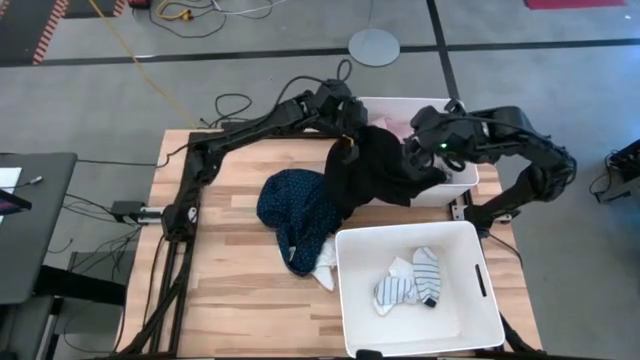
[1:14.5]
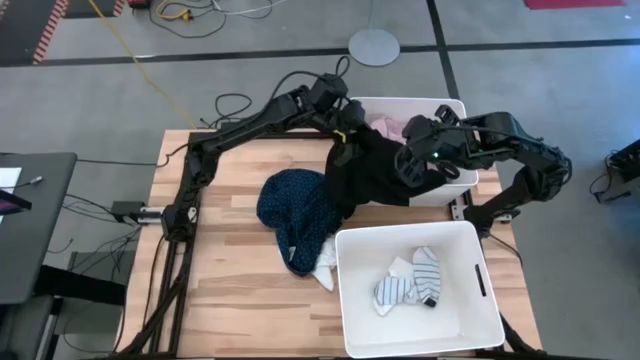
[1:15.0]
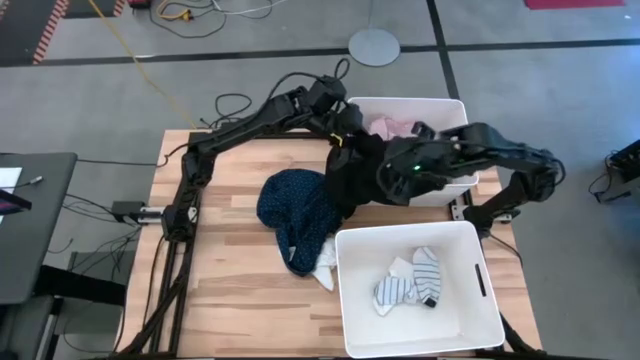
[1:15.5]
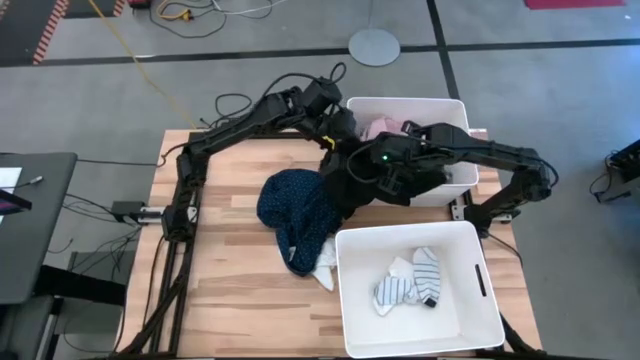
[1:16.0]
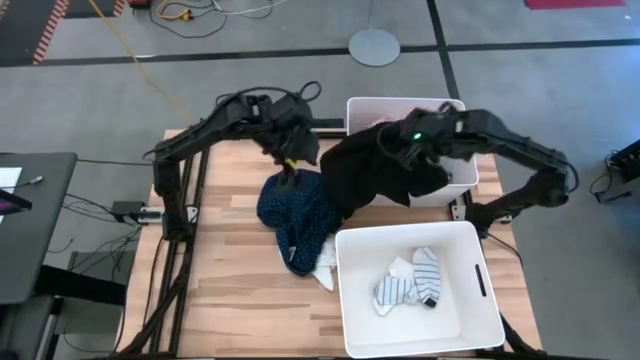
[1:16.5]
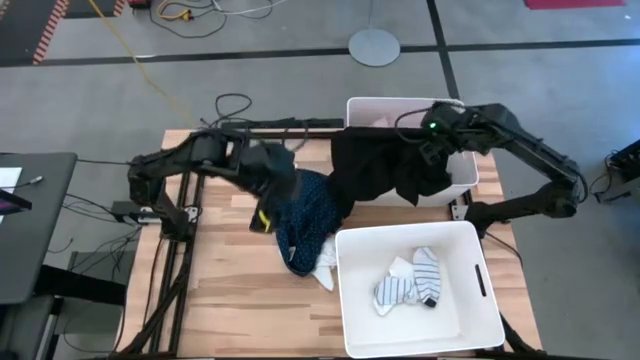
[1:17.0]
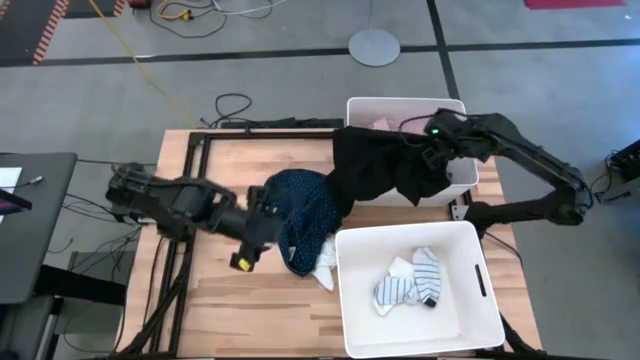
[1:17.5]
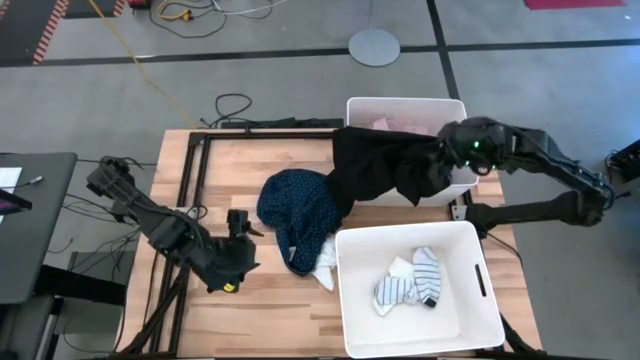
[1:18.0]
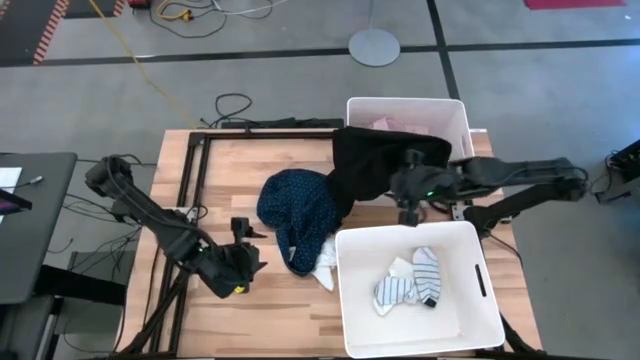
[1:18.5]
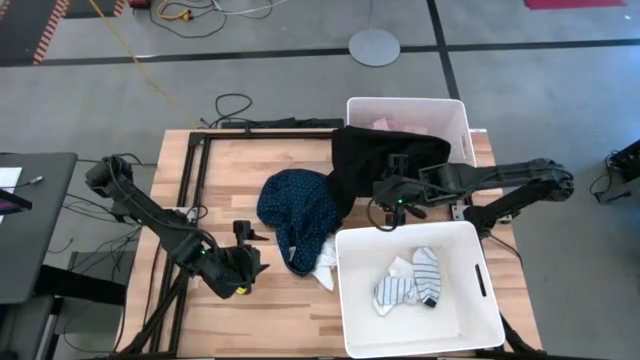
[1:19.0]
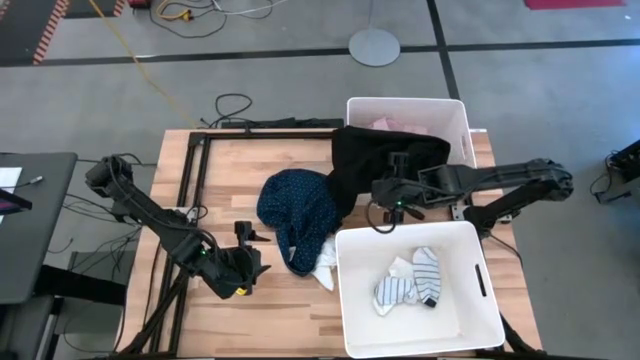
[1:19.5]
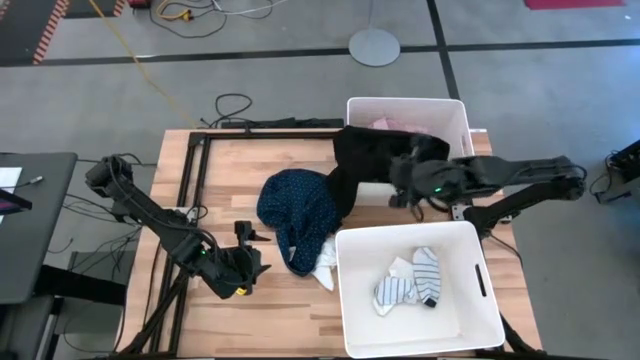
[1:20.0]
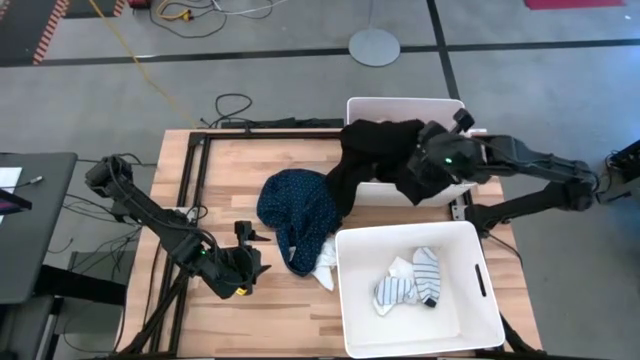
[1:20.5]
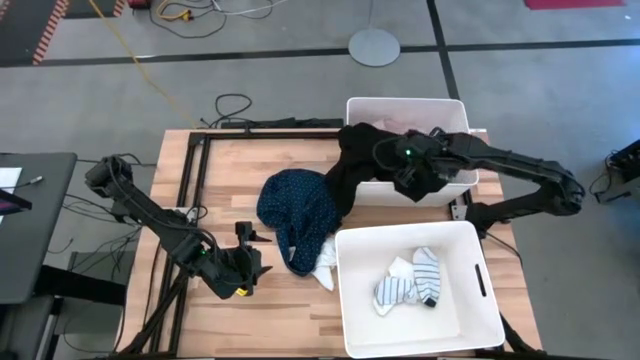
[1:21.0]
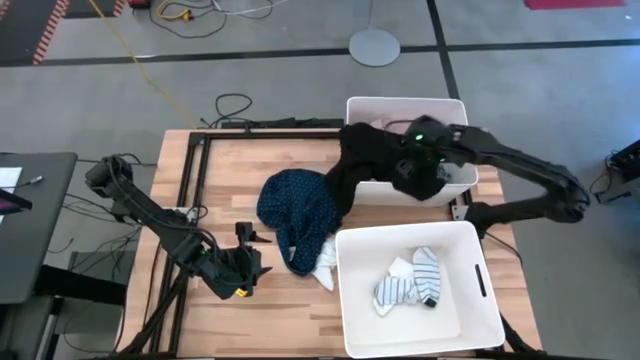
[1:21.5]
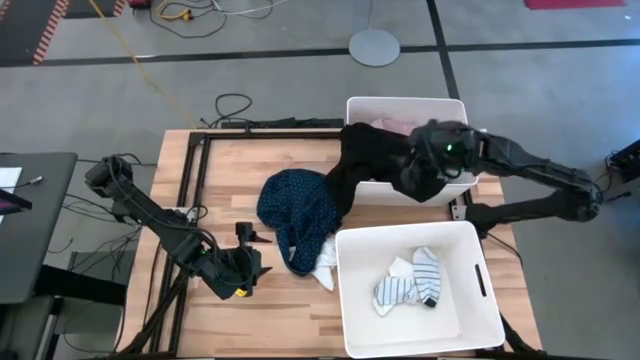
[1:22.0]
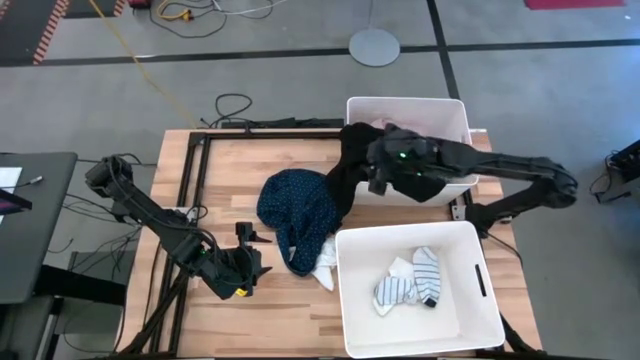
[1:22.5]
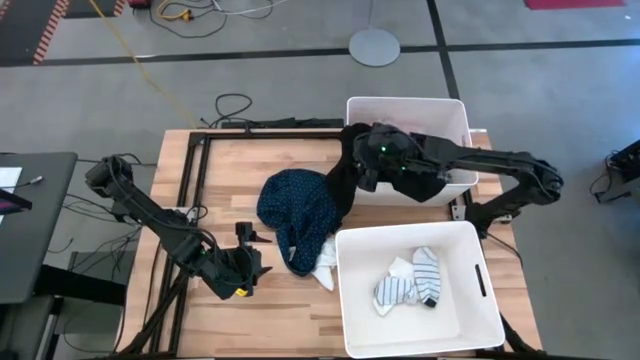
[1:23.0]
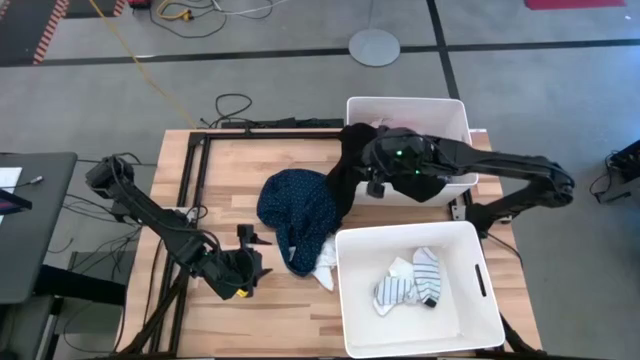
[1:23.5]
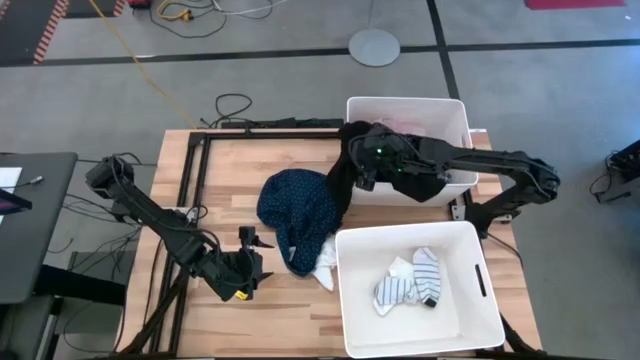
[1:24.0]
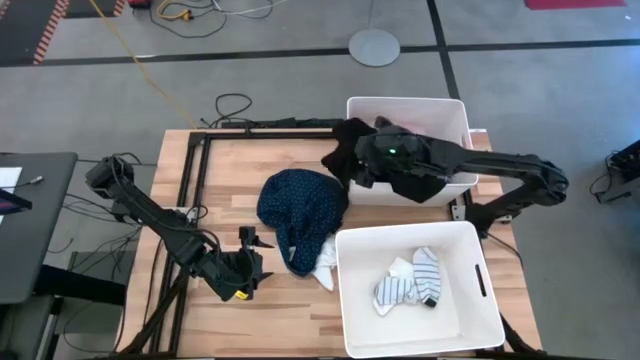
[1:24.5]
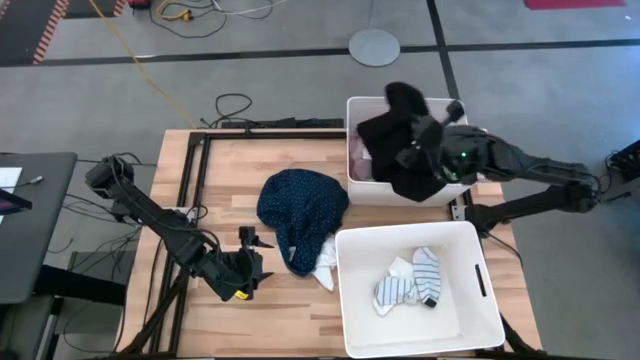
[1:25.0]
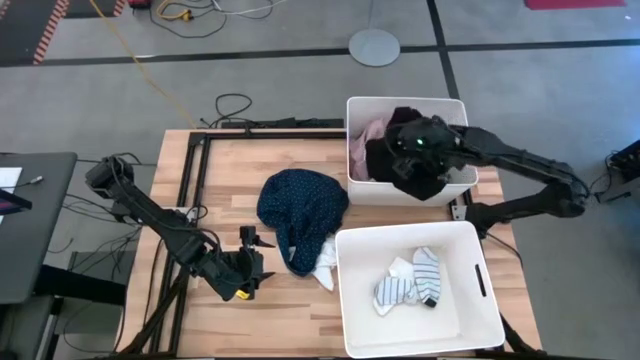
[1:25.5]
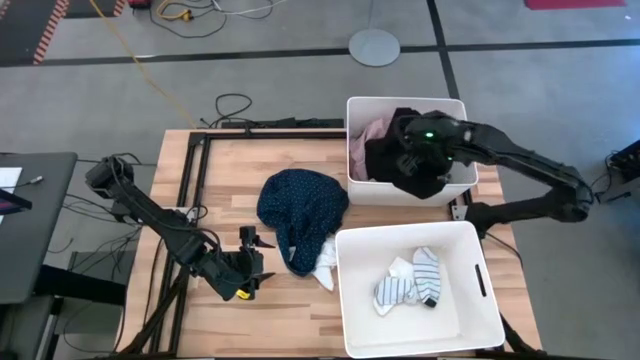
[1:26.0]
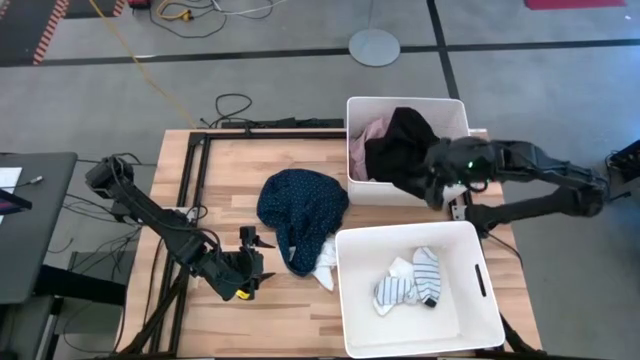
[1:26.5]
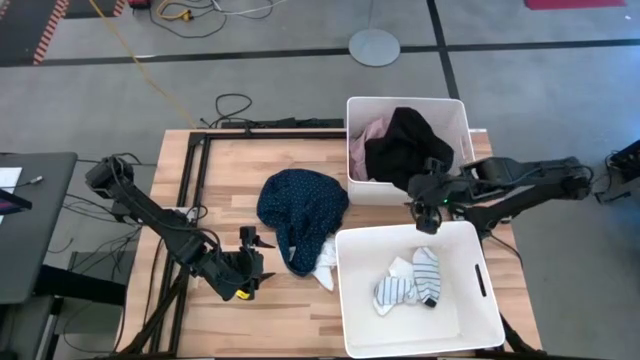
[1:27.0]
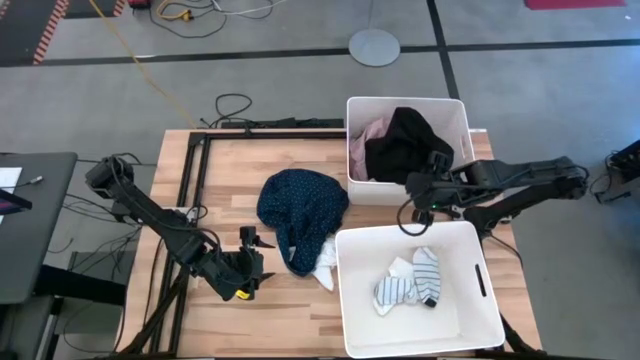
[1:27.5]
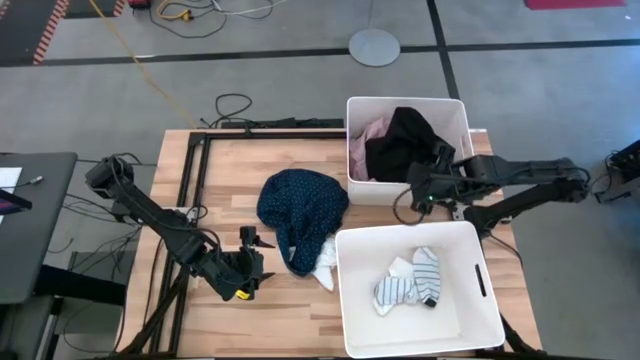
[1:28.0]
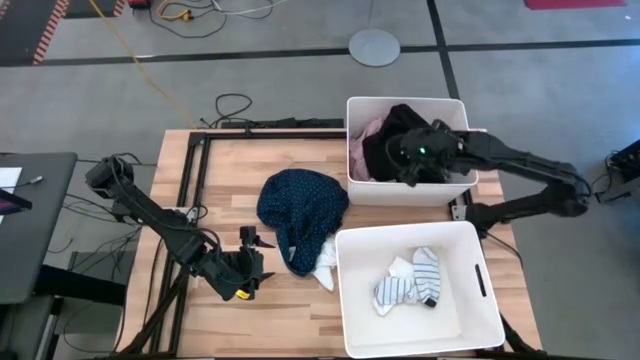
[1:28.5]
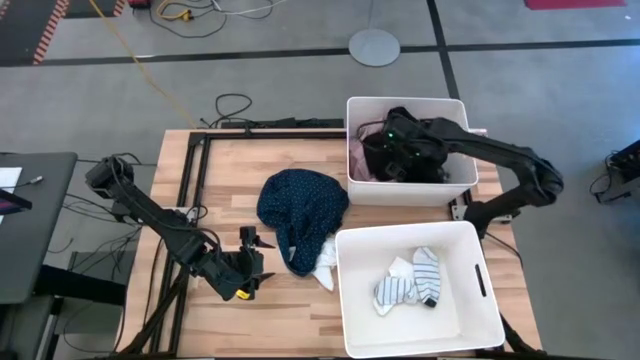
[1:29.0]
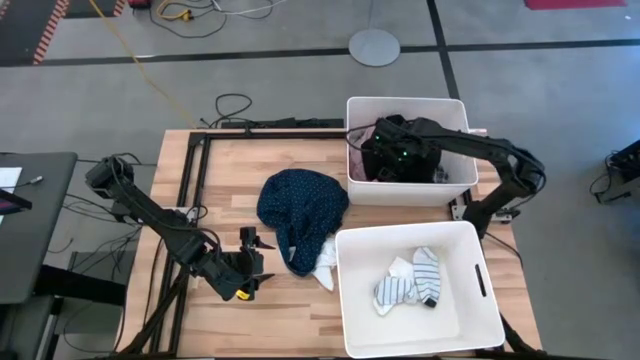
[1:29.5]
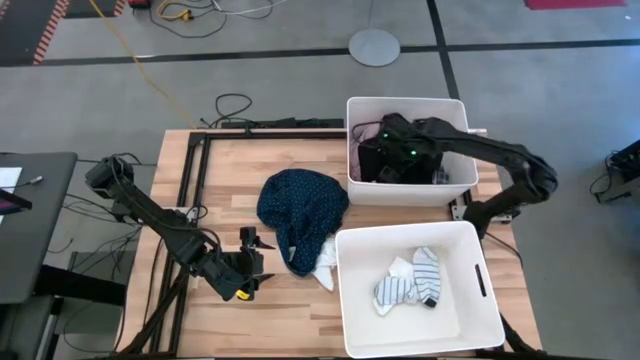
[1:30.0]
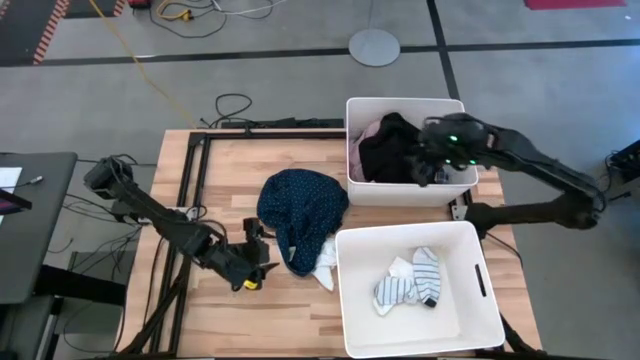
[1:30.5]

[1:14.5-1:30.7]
Task: Sort clothes
Put the black shirt into the top white laundry bin

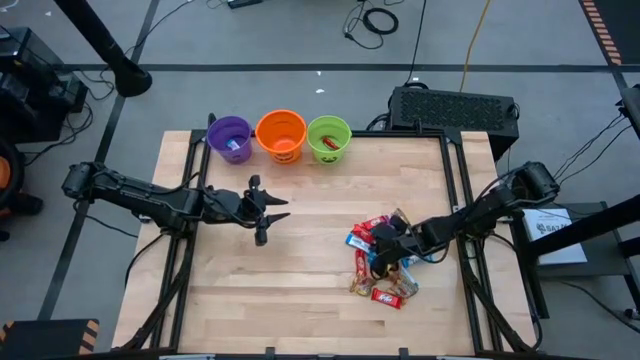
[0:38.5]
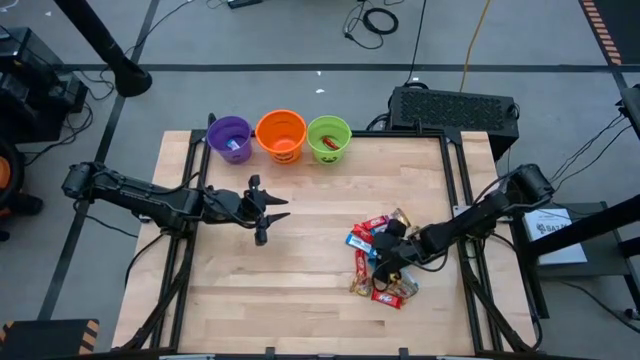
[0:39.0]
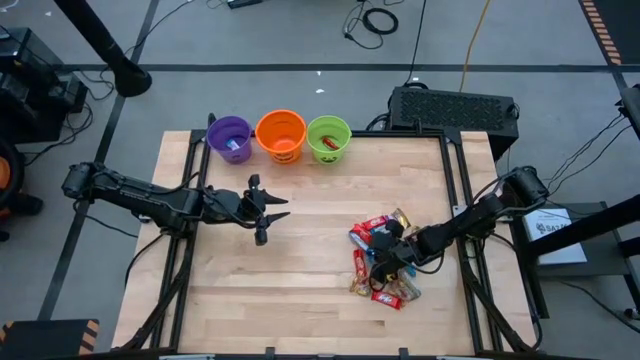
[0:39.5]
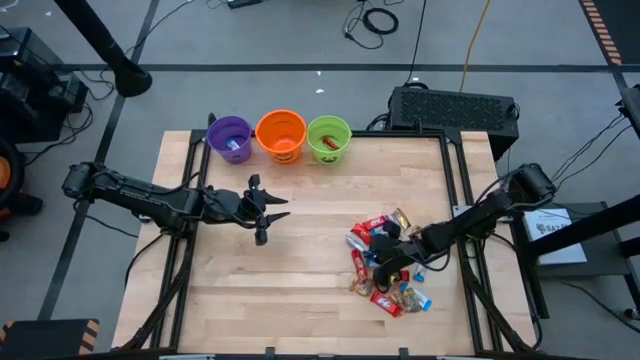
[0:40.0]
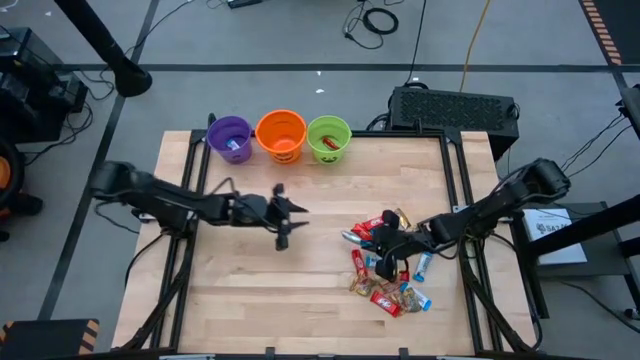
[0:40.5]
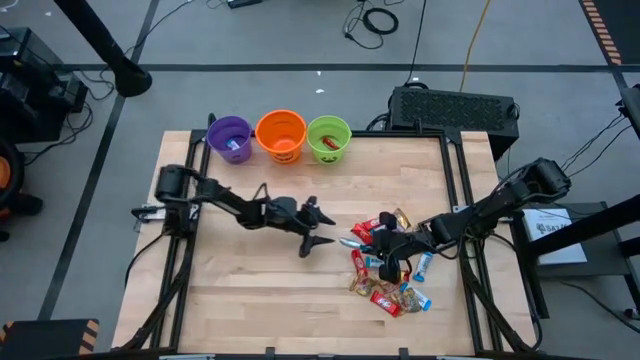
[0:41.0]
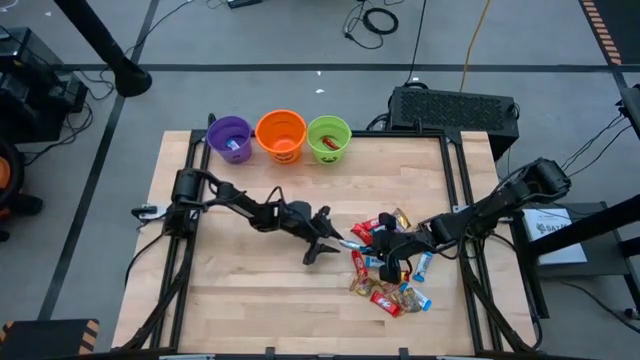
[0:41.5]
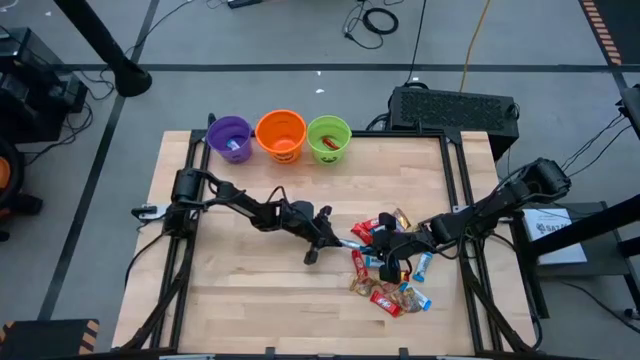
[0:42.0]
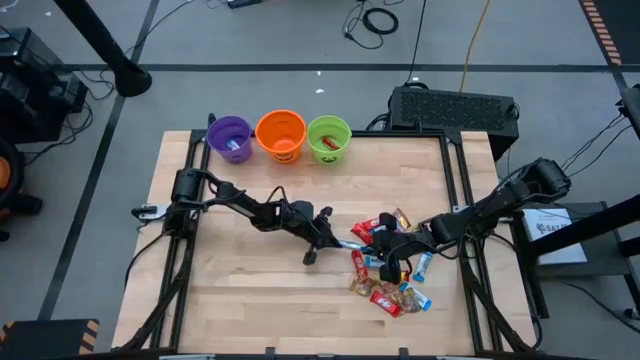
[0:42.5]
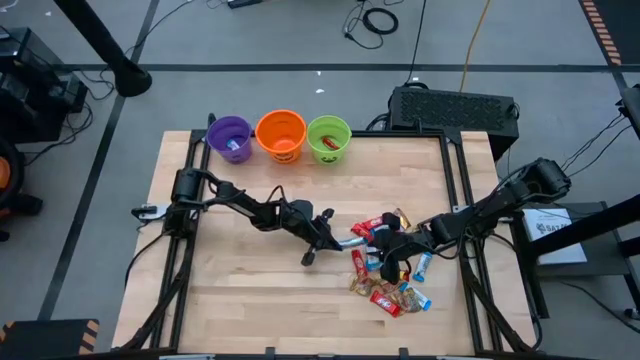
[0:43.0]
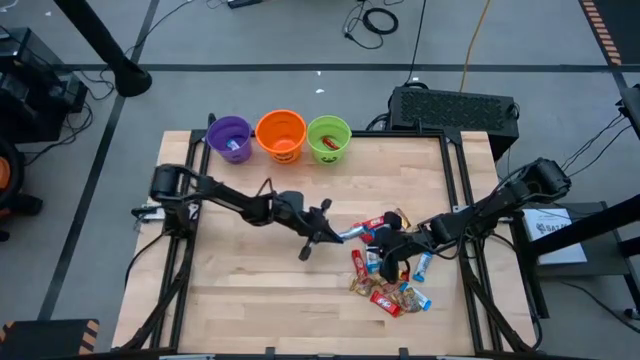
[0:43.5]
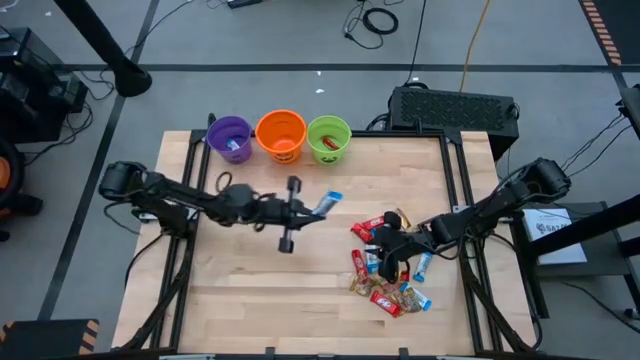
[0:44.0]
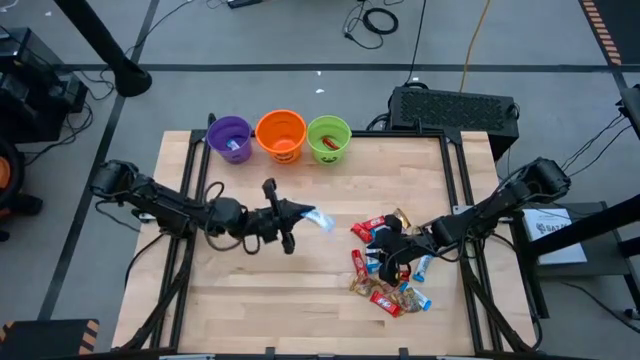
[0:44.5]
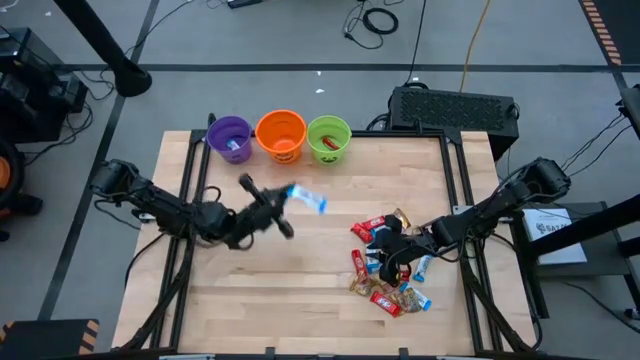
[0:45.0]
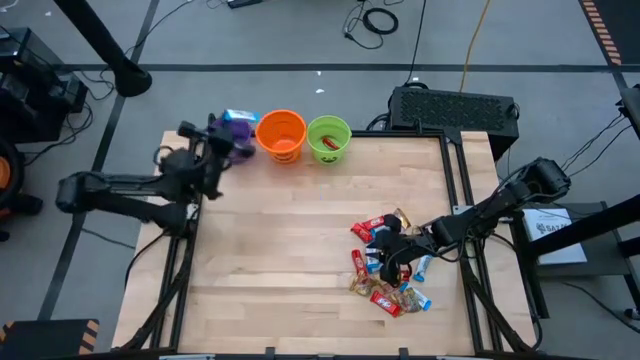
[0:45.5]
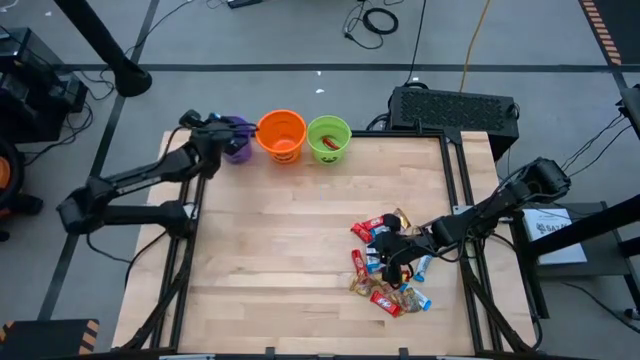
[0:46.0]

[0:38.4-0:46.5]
Task: Sort candy by brand, put in halloween buckets
Put the white chocolate bar into the violet bucket
